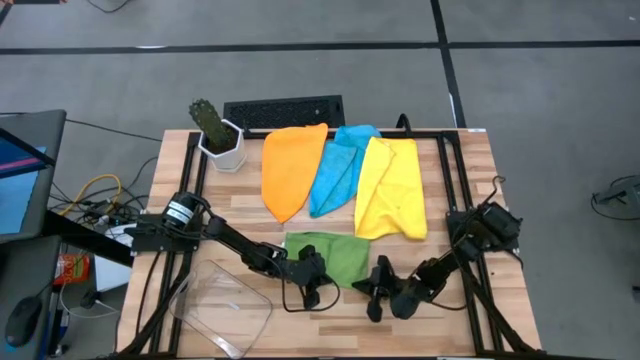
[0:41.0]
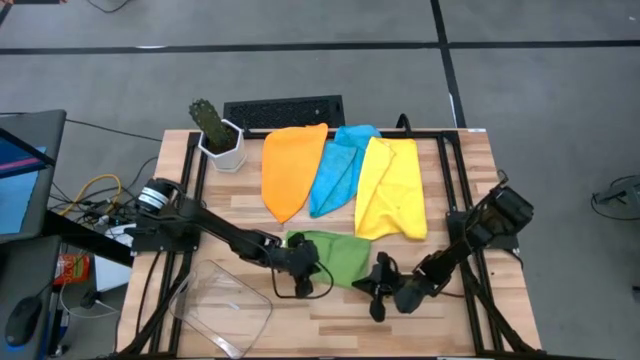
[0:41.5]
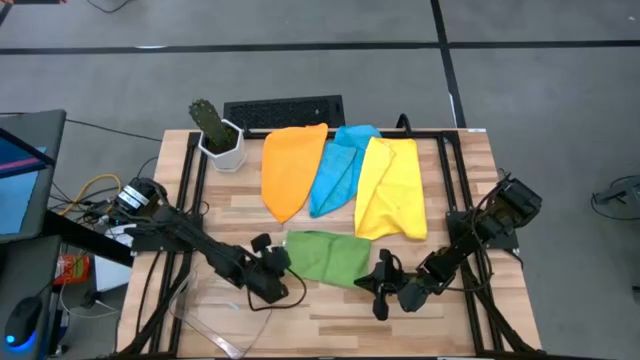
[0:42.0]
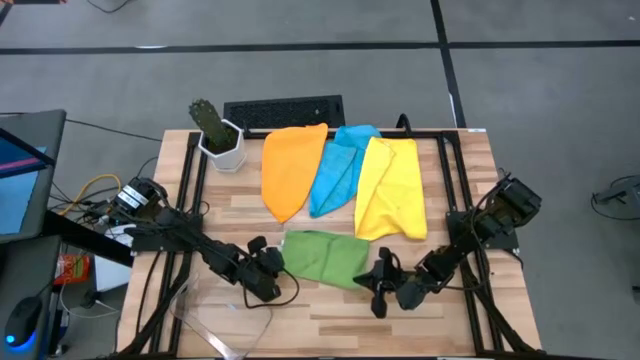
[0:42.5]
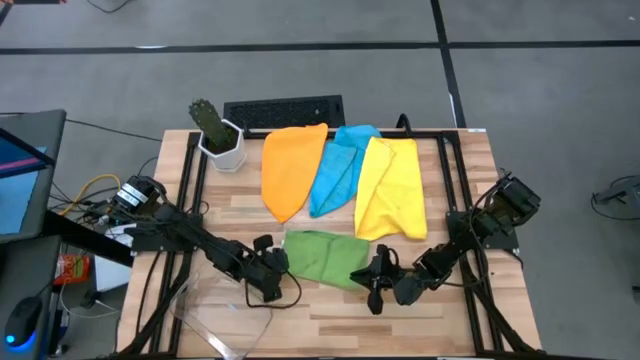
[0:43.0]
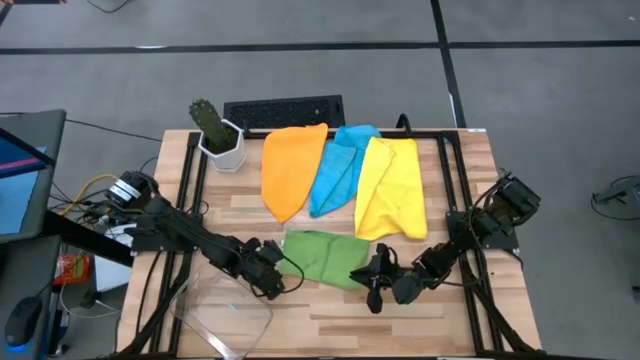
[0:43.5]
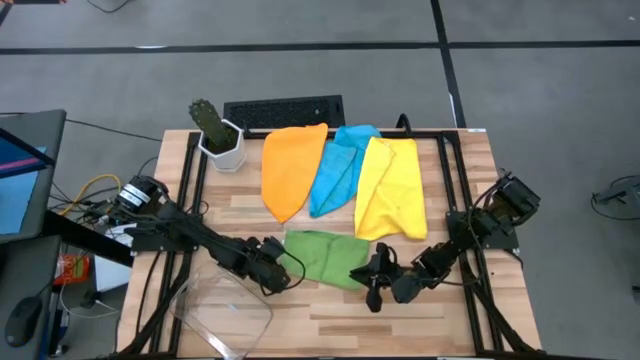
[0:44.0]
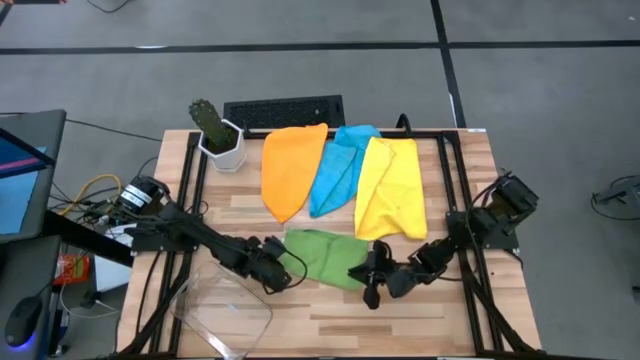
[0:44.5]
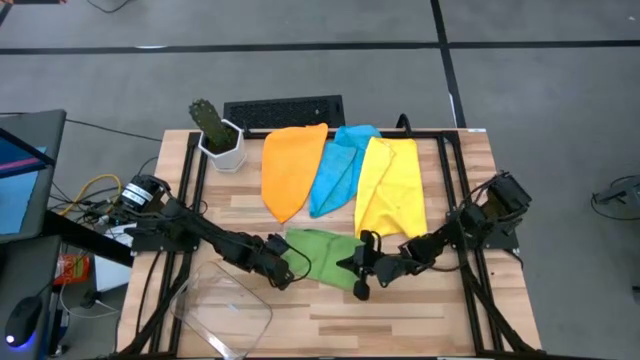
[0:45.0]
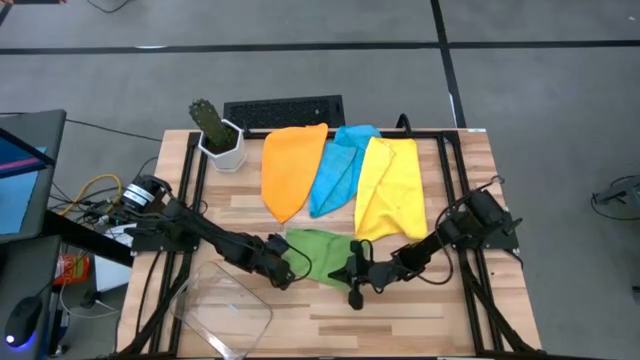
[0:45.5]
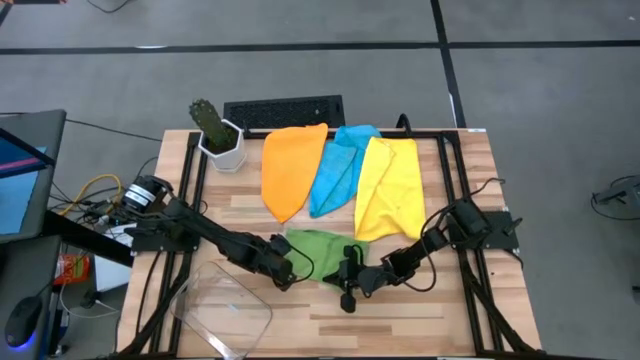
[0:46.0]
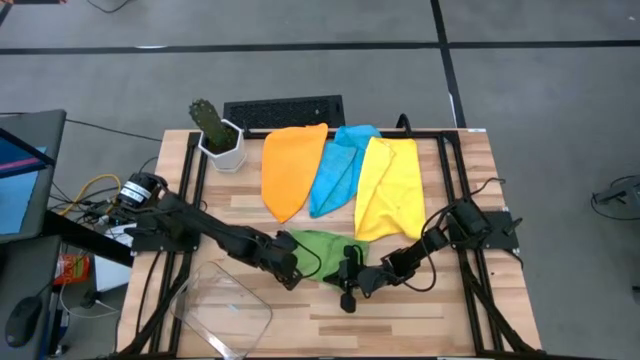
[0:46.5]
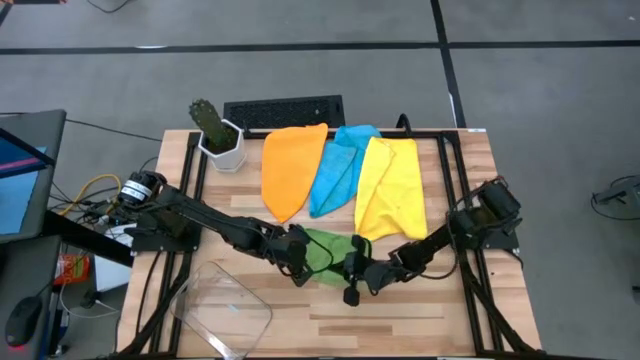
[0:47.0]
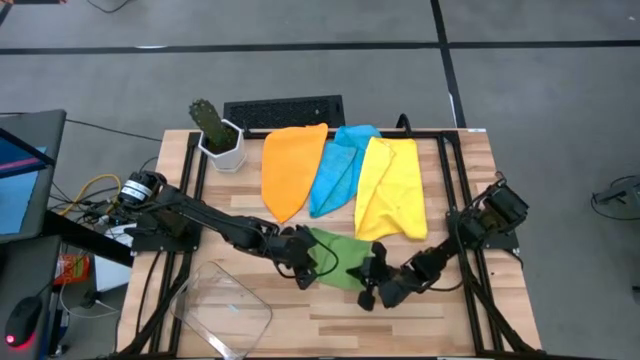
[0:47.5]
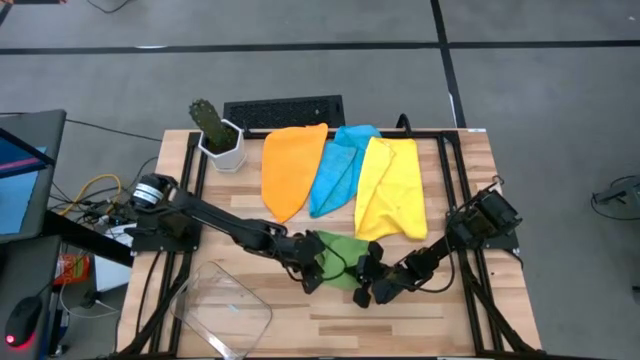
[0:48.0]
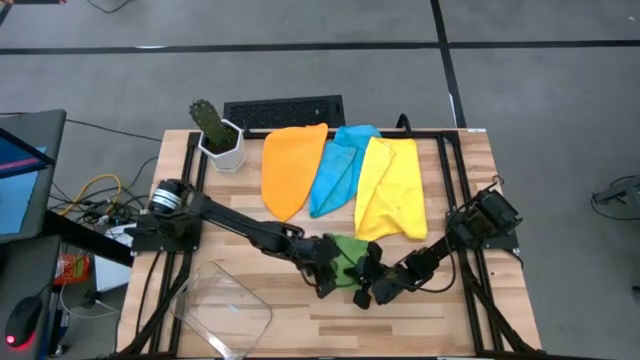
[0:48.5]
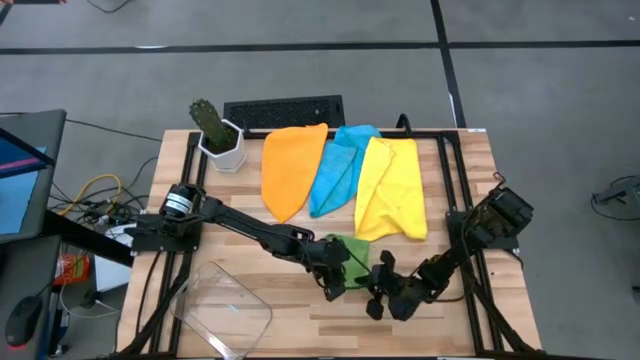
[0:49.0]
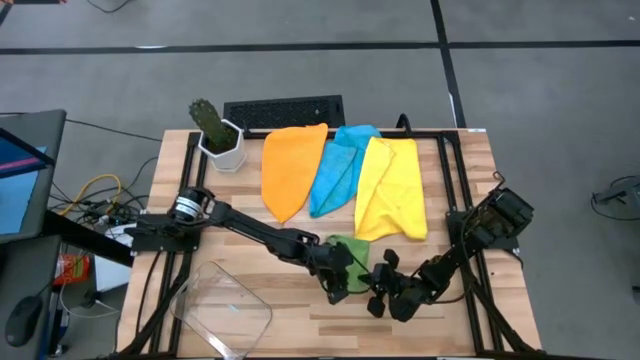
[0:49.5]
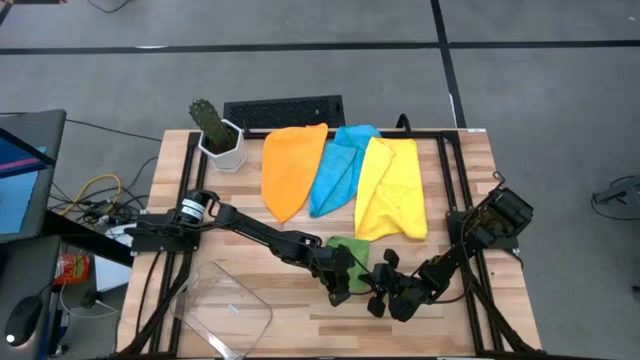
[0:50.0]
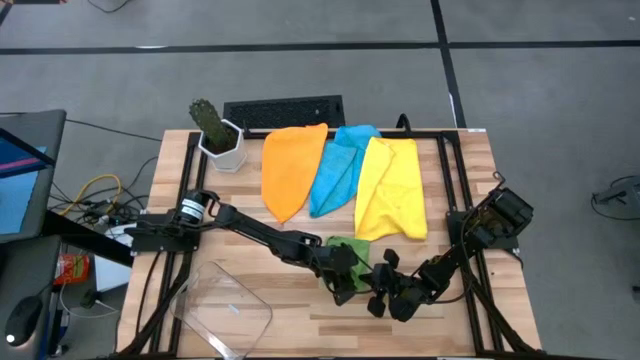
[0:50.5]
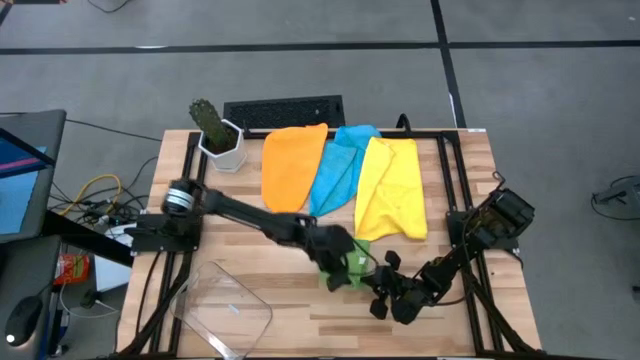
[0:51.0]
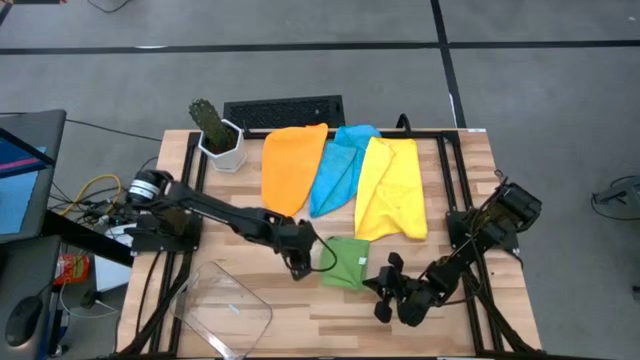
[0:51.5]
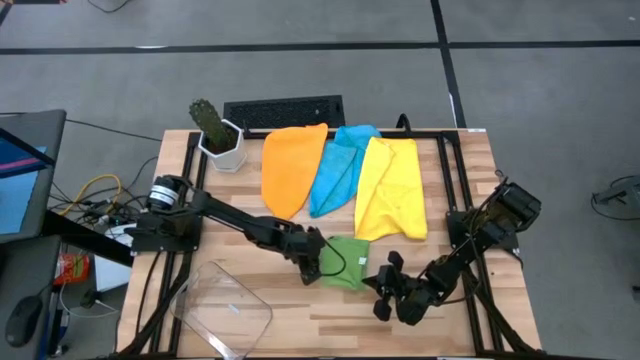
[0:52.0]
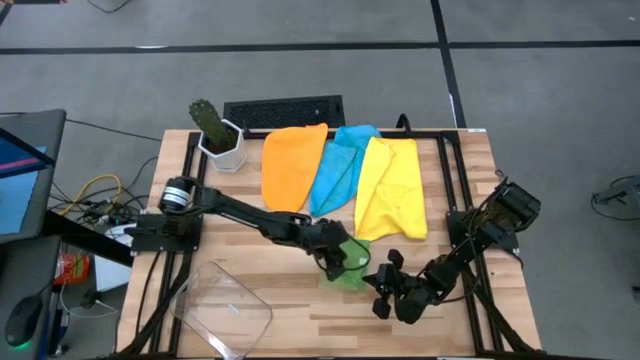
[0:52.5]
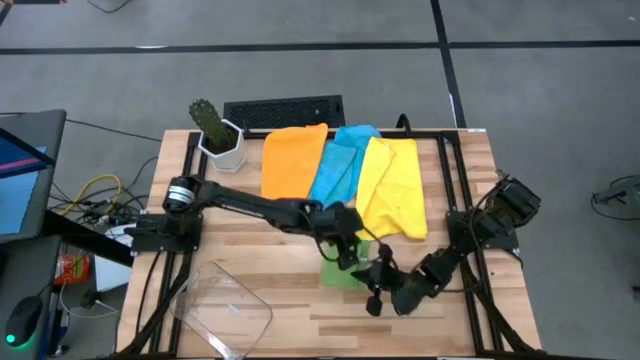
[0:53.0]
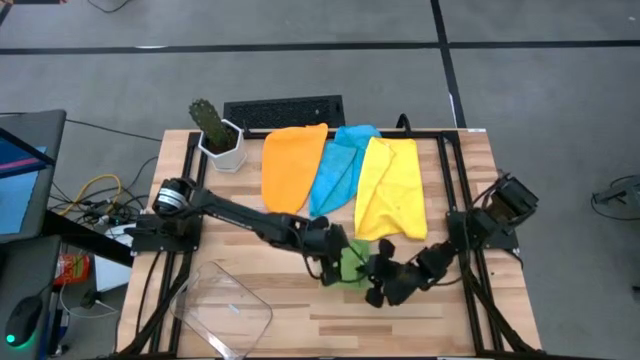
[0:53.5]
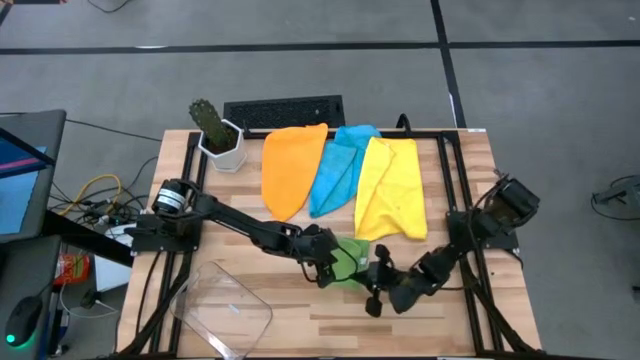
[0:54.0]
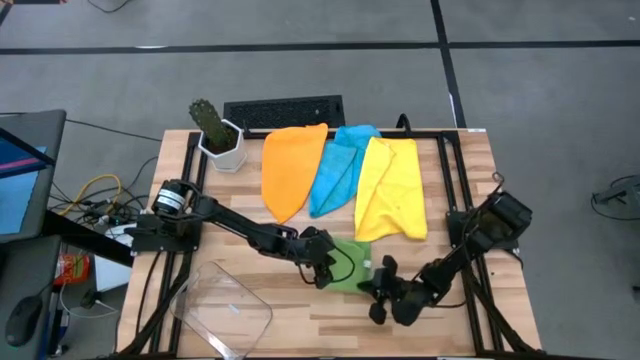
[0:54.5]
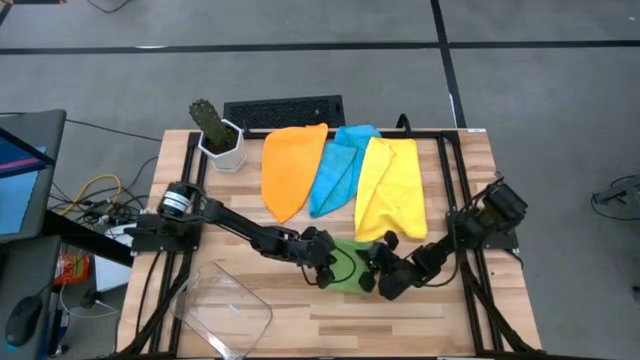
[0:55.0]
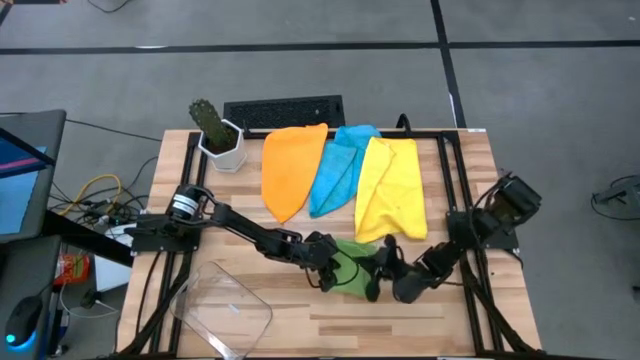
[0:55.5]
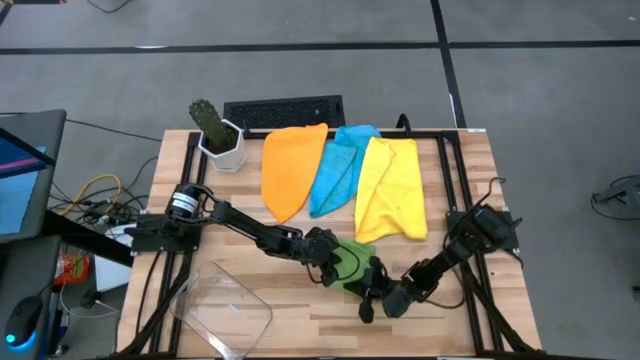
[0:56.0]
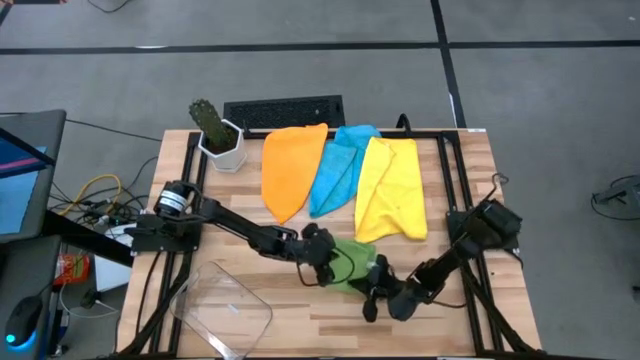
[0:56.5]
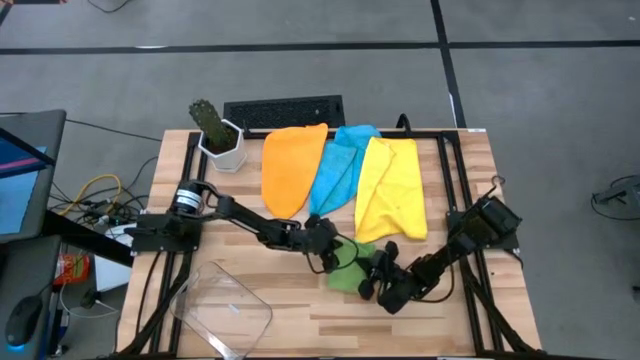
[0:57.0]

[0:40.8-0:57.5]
Task: Fold microfiber towels
Fold the green microfiber towel

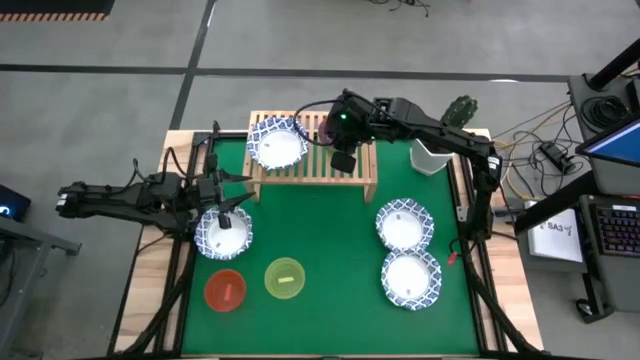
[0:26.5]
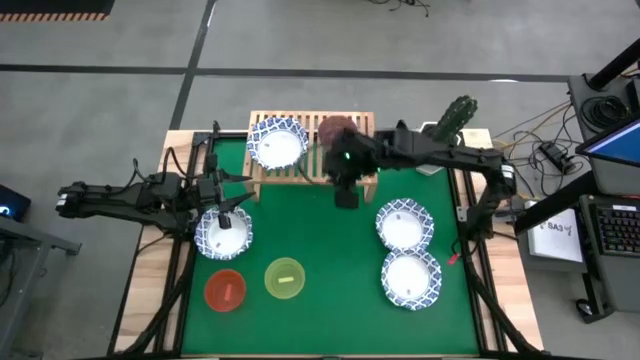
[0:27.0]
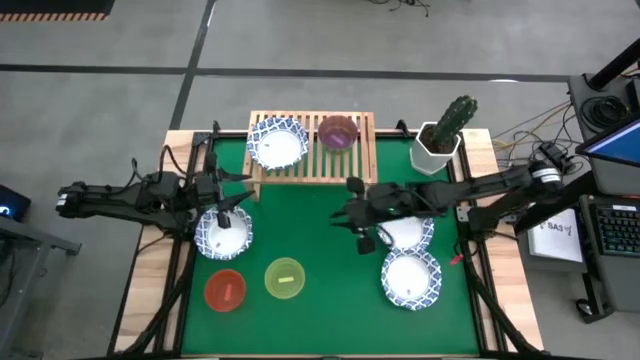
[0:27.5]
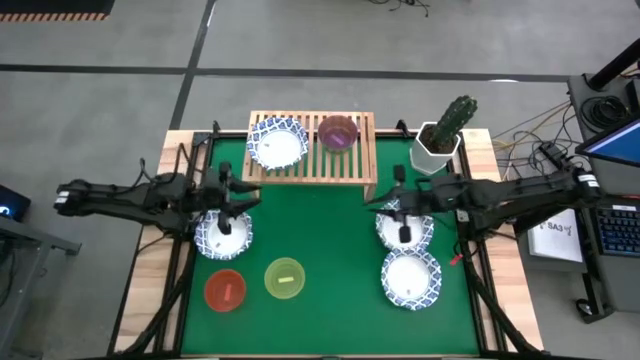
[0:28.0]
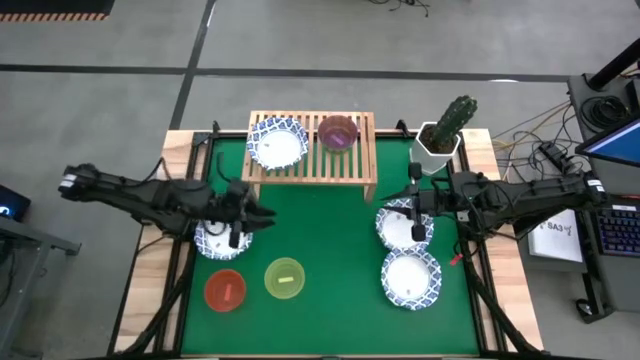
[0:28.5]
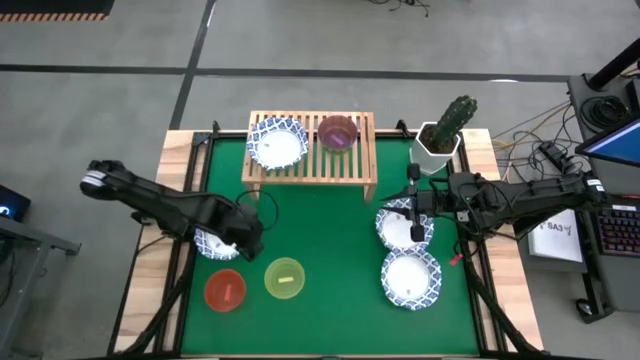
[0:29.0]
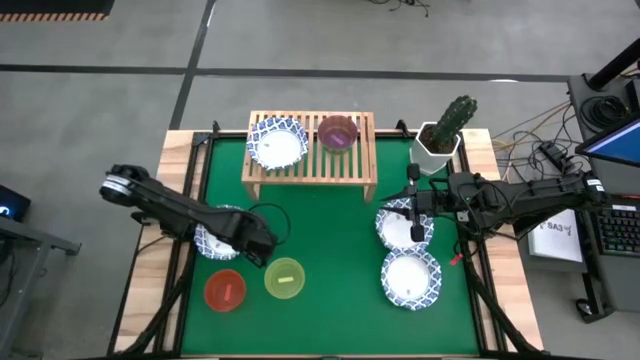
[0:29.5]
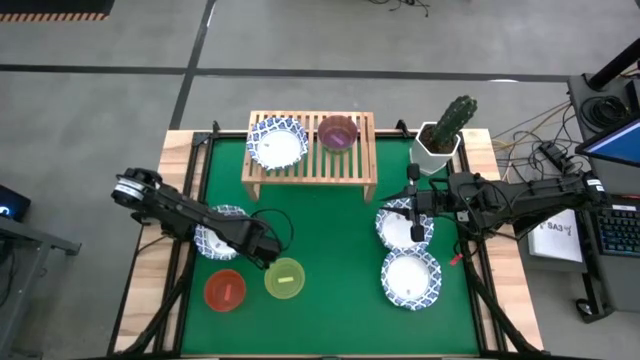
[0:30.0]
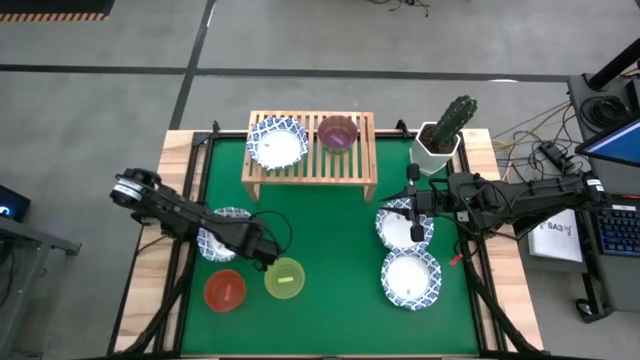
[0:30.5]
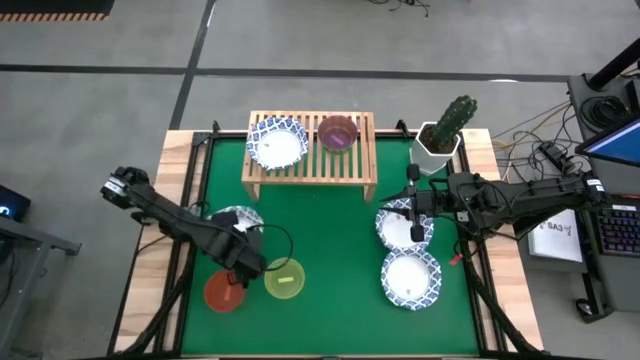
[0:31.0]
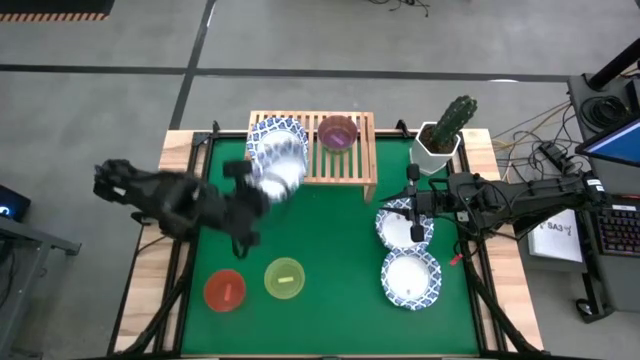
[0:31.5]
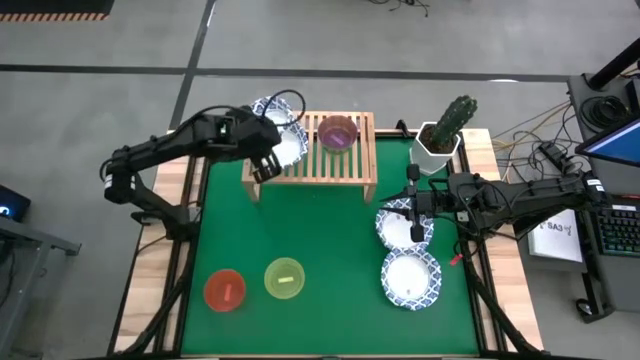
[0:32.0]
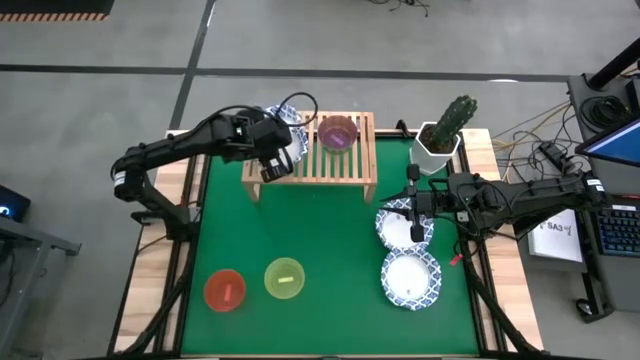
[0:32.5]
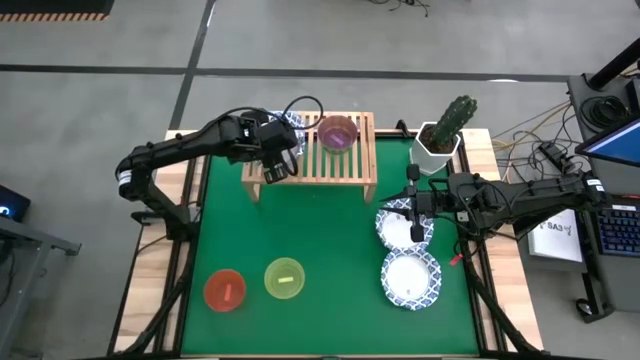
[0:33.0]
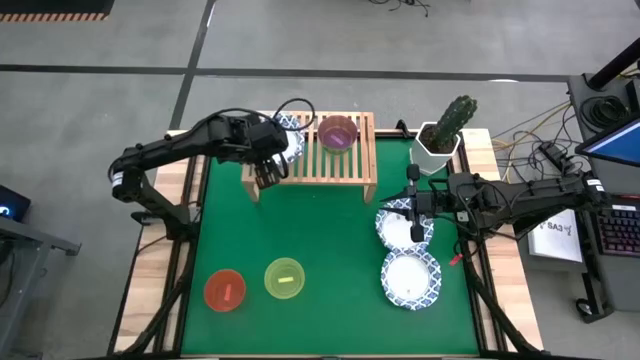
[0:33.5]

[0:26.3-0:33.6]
Task: Place and stack bowls onto a shelf
Stack the blue patterned bowl on top of the blue patterned bowl on the shelf
